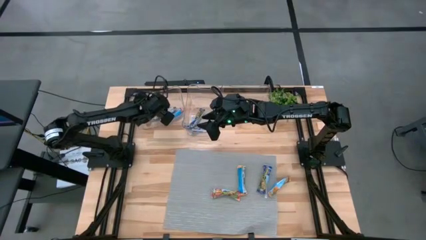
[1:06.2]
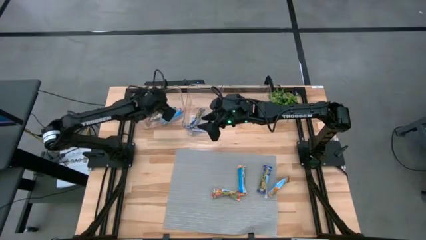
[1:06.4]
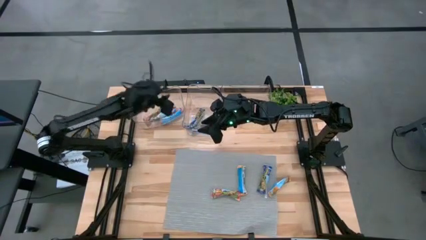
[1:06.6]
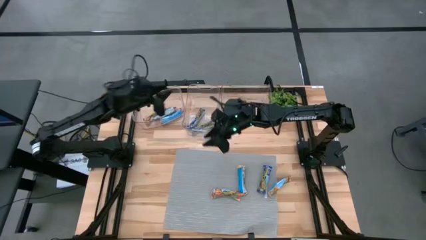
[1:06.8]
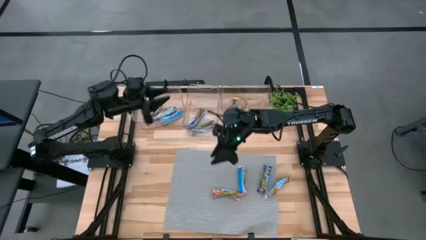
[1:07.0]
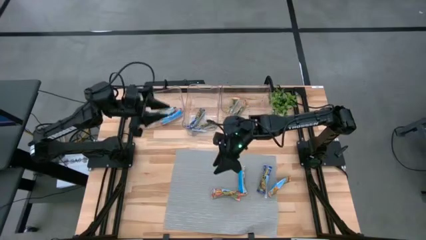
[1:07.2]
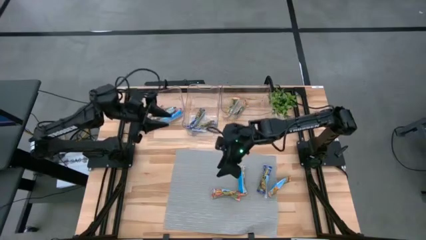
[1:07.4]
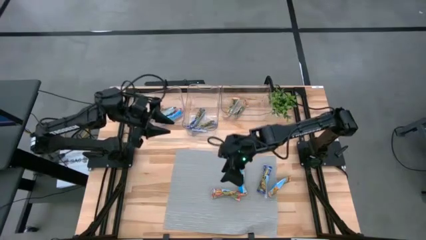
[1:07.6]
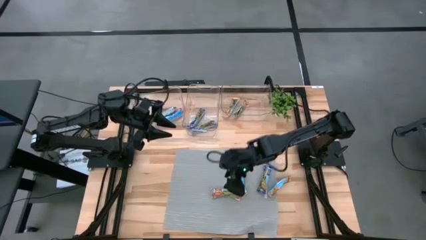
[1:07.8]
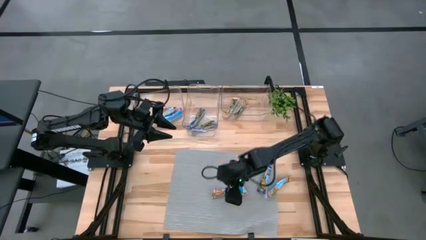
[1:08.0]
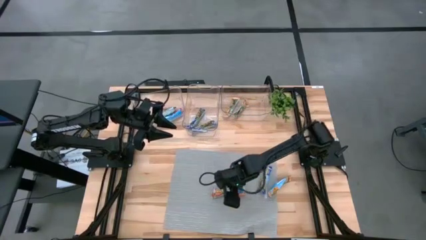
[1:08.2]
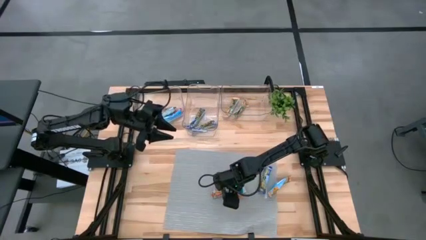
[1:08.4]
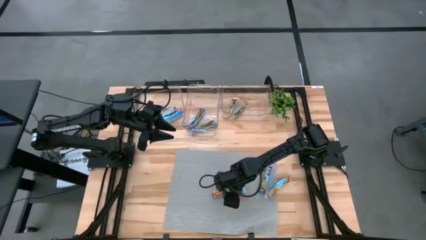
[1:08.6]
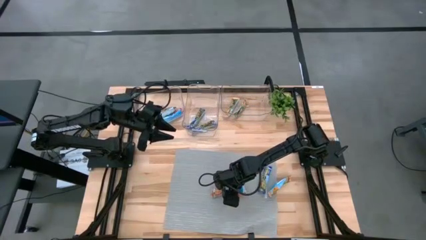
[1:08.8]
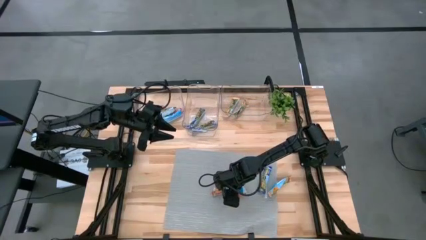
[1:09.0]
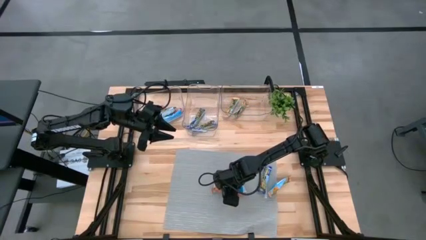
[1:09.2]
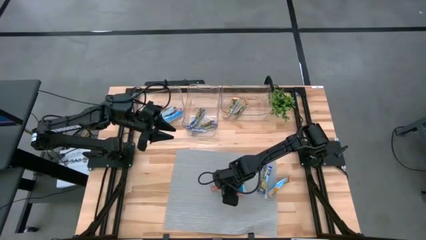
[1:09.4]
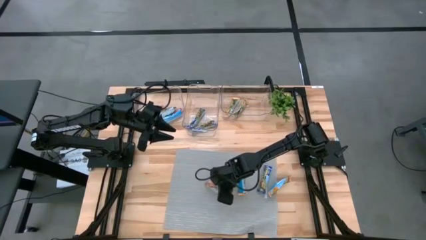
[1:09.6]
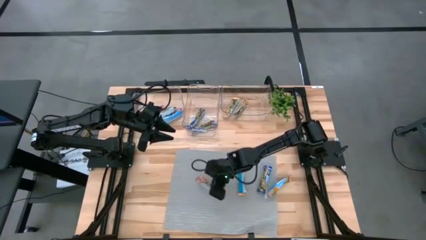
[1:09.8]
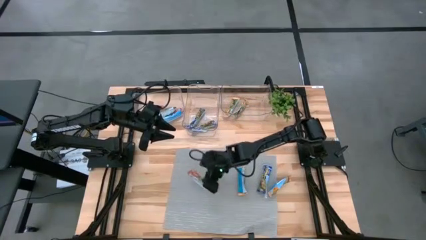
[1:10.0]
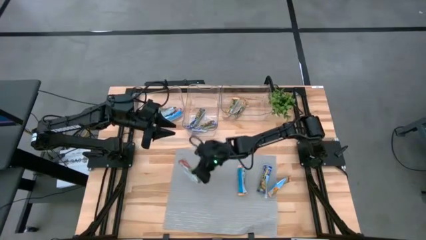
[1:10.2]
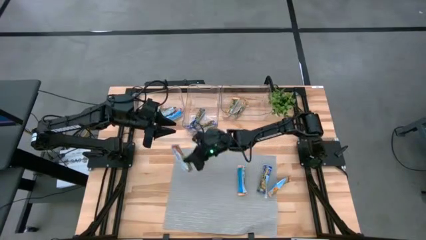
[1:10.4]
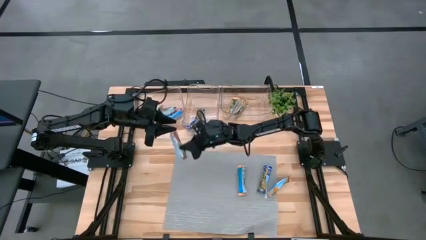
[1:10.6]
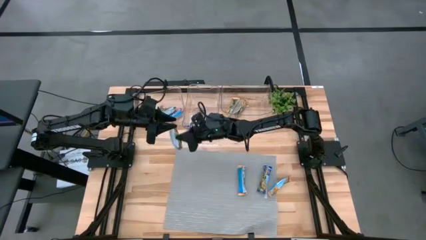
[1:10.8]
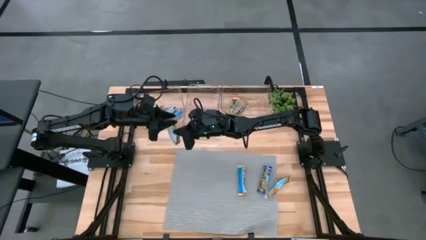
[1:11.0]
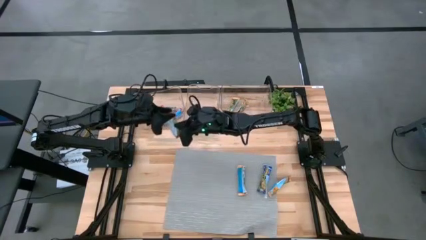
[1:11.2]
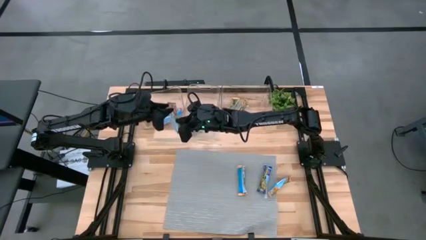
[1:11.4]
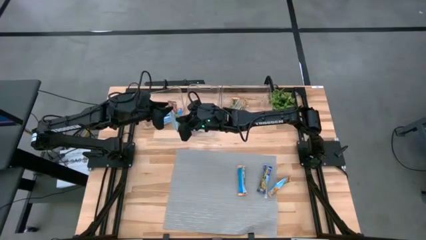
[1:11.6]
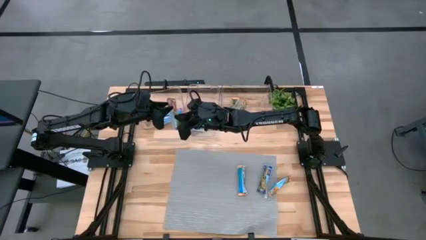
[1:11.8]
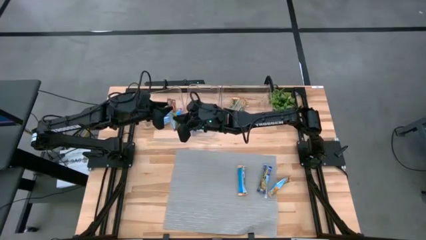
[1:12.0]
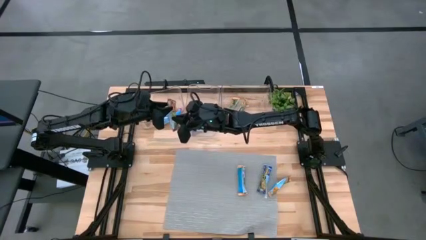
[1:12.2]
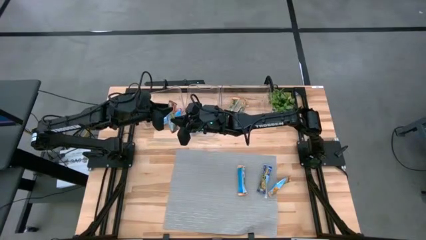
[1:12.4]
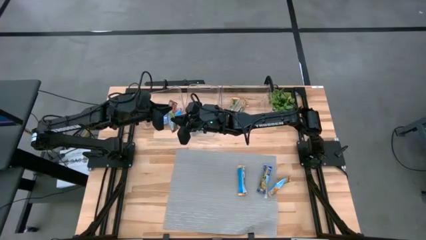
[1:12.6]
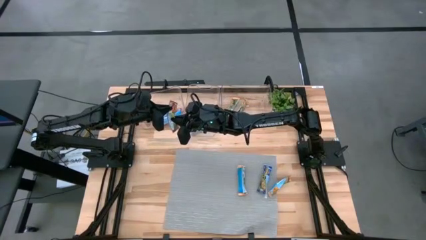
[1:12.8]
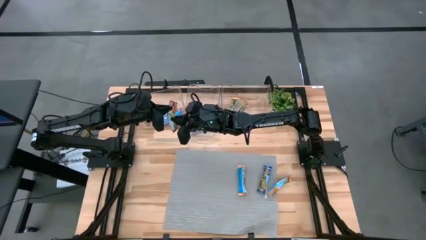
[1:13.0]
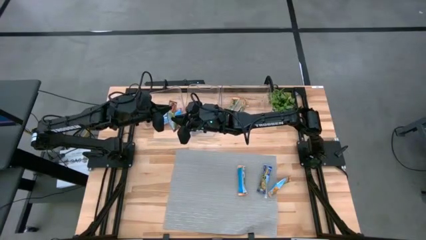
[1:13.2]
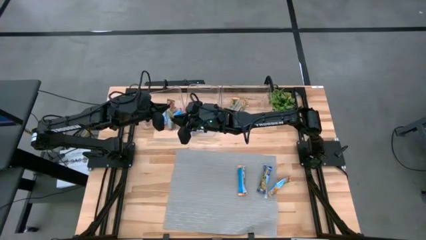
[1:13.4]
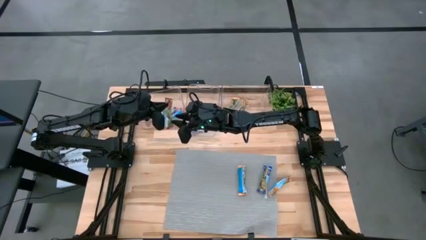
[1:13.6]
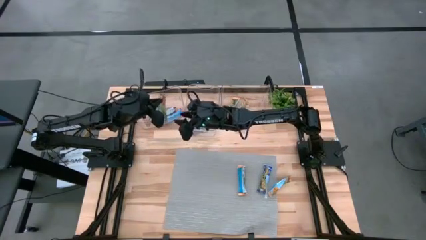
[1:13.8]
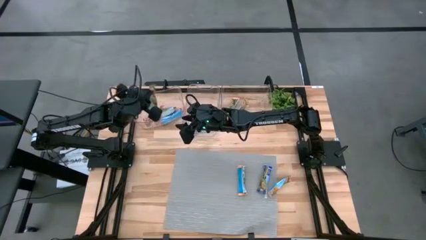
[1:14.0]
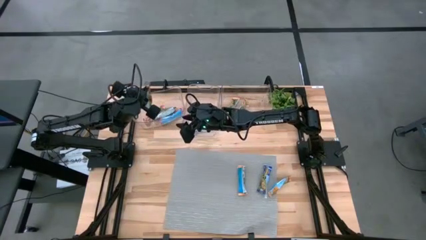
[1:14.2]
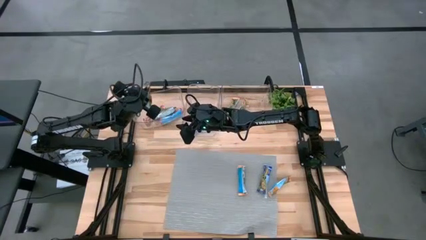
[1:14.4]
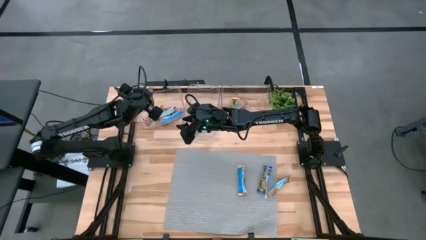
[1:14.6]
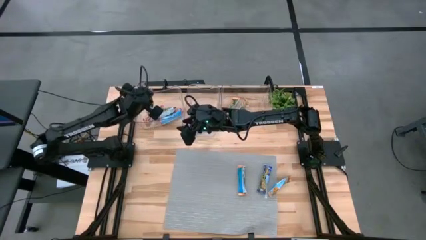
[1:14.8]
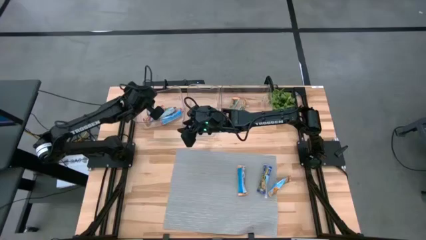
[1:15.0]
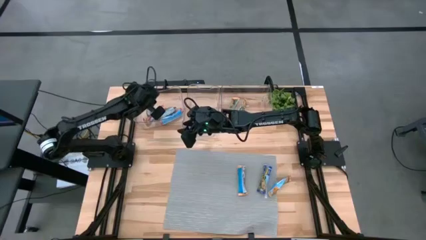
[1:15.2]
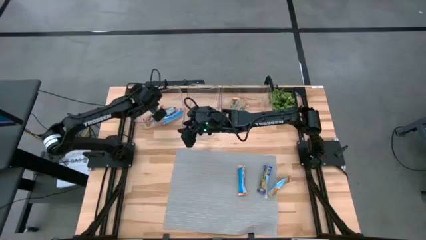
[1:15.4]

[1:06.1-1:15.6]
Task: Pick and place Granola Bars by type
Put the red granola bar into the left transparent bin

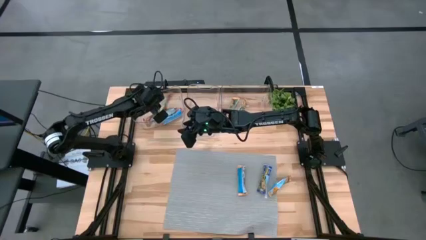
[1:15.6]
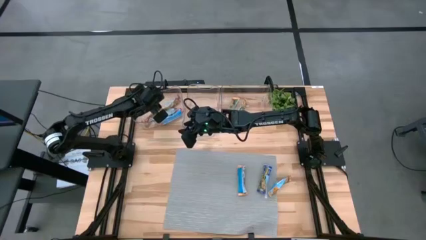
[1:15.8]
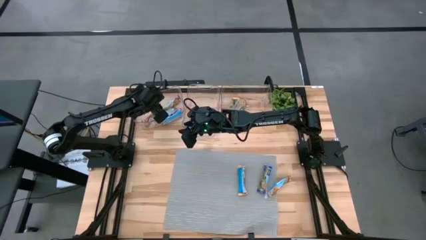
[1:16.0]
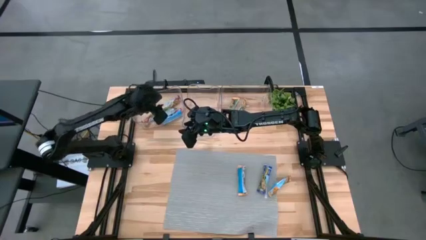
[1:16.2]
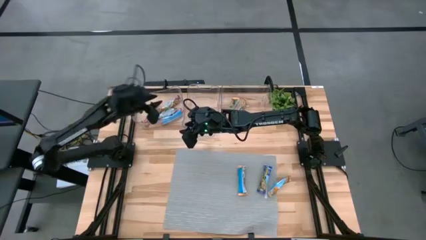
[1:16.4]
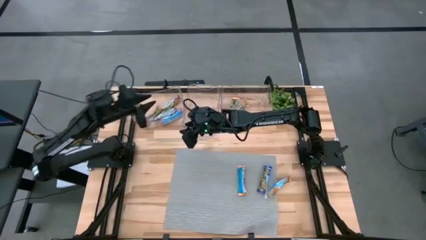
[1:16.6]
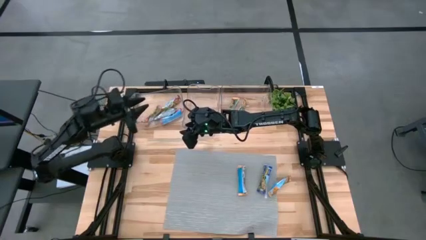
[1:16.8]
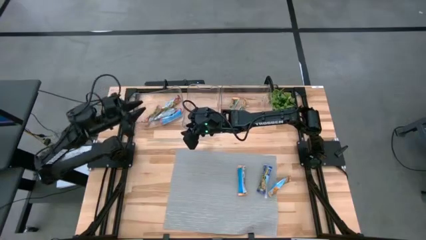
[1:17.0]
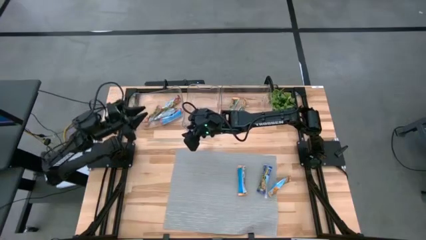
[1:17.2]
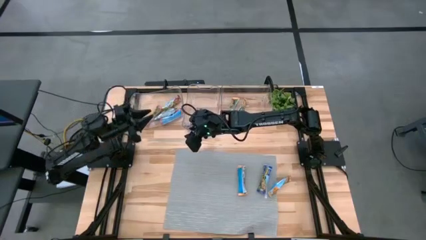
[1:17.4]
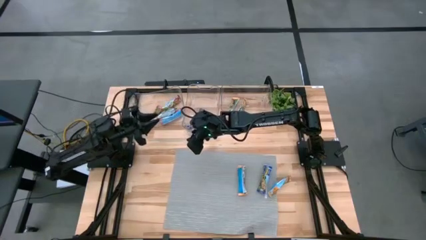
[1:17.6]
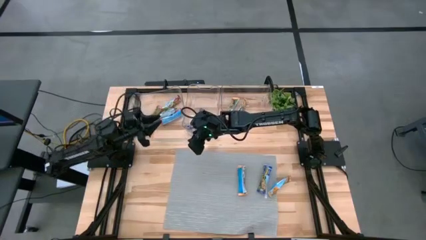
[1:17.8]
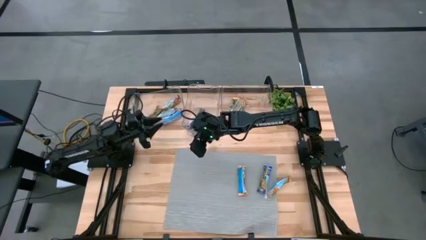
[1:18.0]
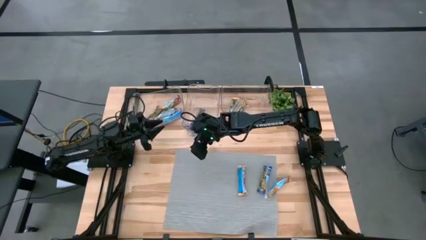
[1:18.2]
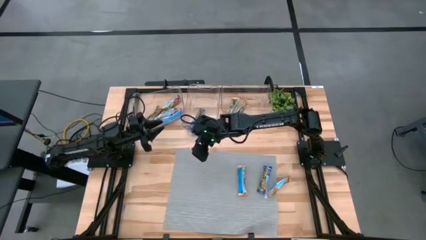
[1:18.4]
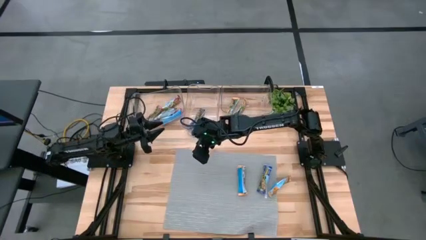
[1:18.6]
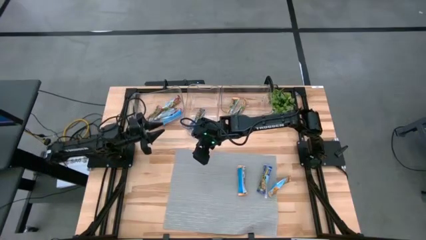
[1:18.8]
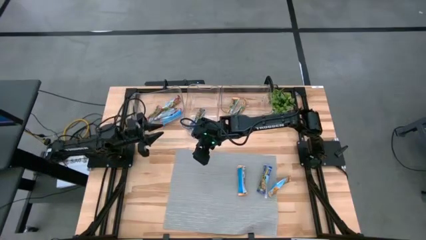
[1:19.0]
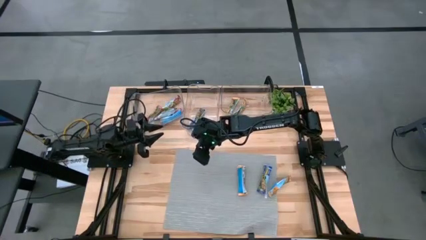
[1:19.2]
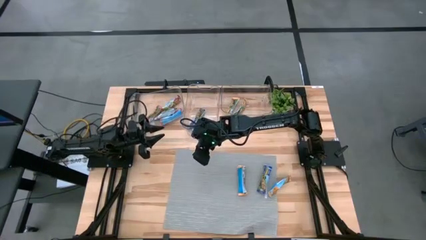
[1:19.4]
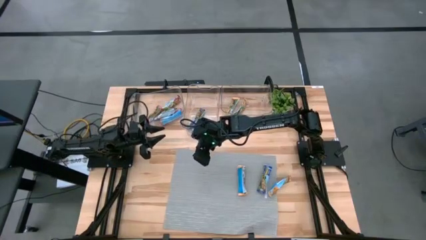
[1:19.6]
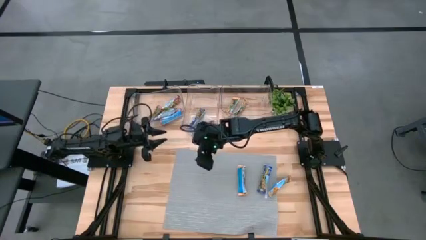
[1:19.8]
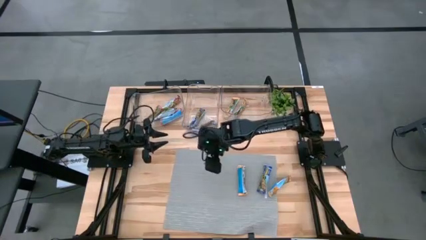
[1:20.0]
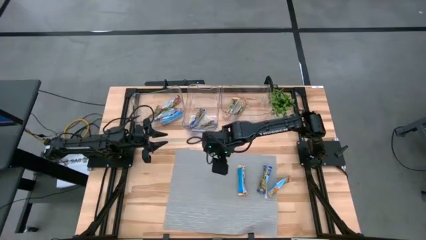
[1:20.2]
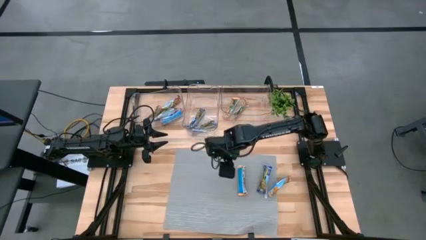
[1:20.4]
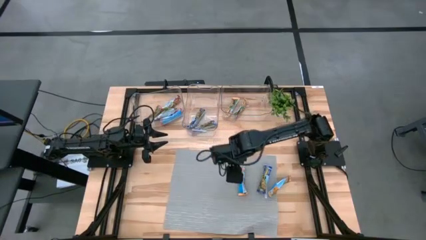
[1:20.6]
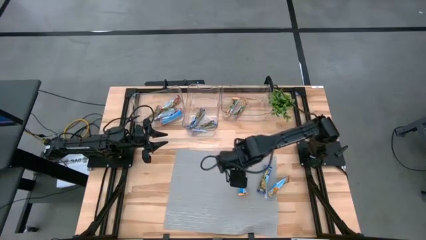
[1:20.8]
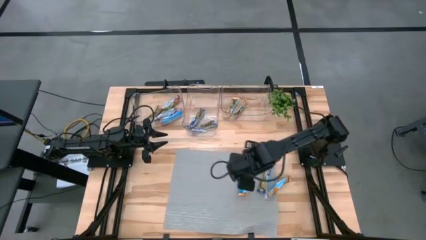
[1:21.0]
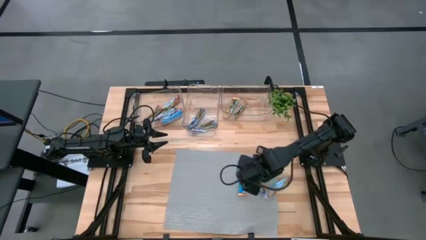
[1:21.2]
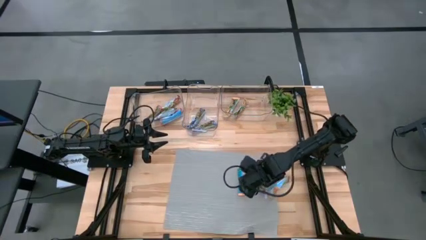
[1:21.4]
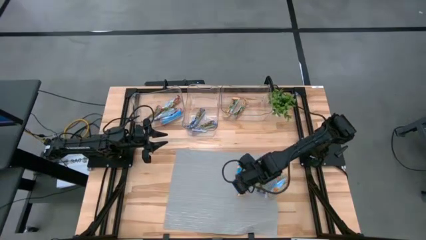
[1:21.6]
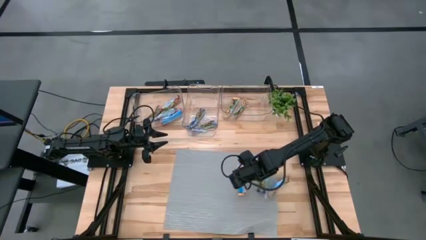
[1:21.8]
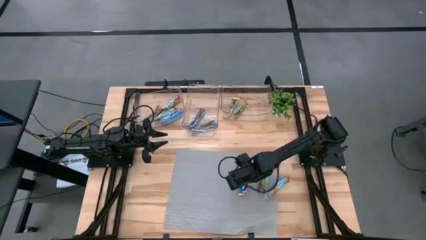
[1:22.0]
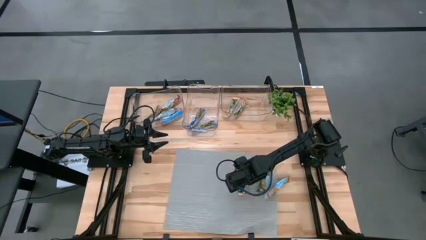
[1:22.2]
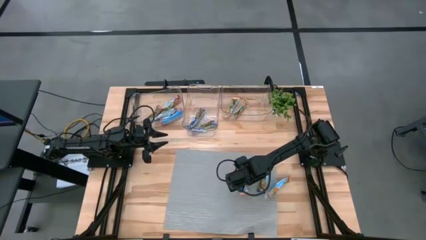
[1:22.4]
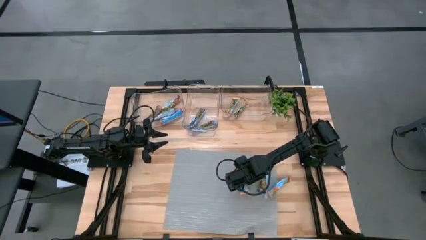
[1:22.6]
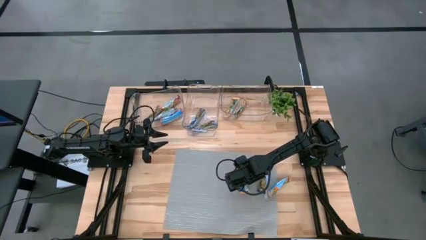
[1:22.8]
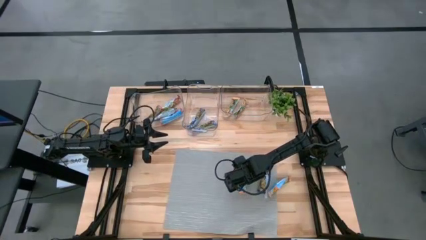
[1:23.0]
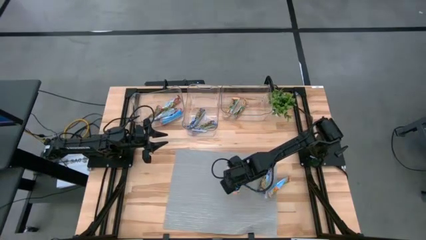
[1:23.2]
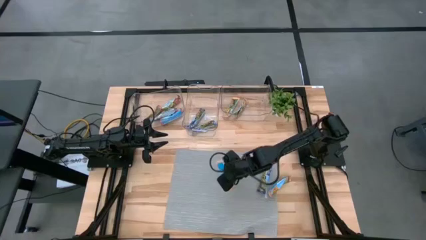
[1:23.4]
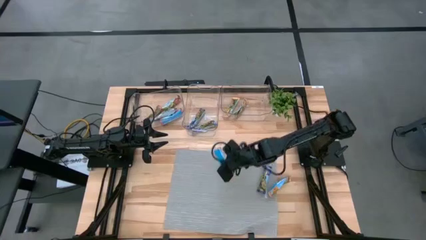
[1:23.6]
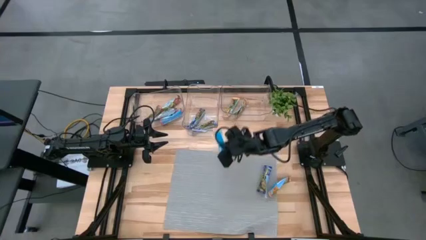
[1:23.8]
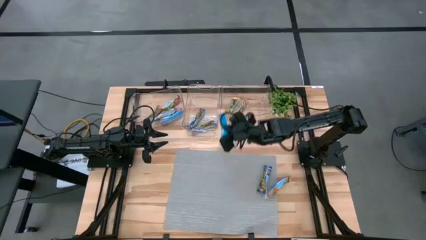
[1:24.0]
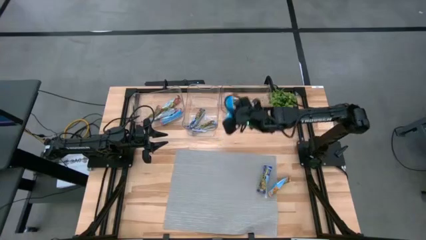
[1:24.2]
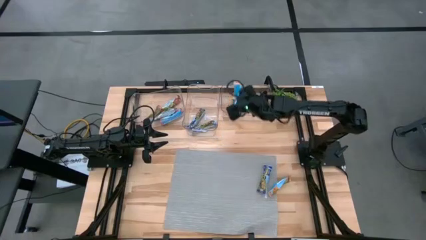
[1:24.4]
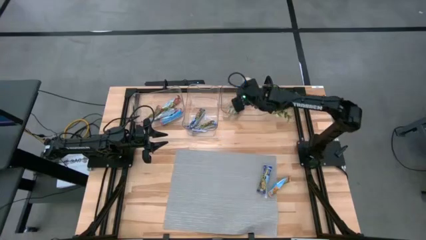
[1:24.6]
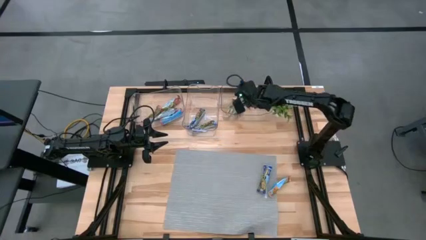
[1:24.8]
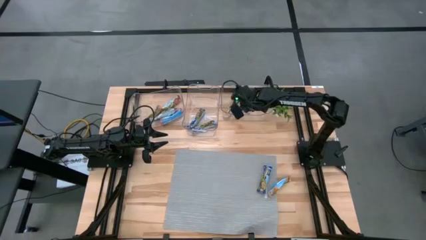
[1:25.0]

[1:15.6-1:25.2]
Put the left yellow granola bar into the right transparent bin
